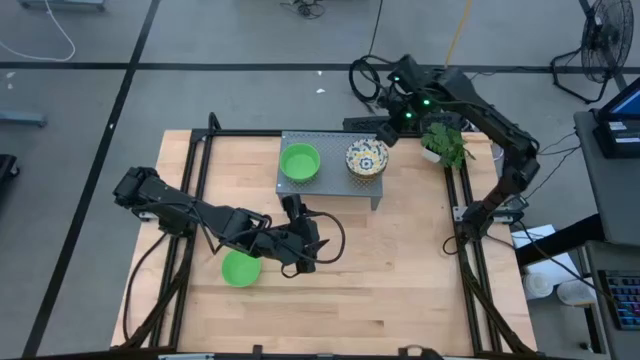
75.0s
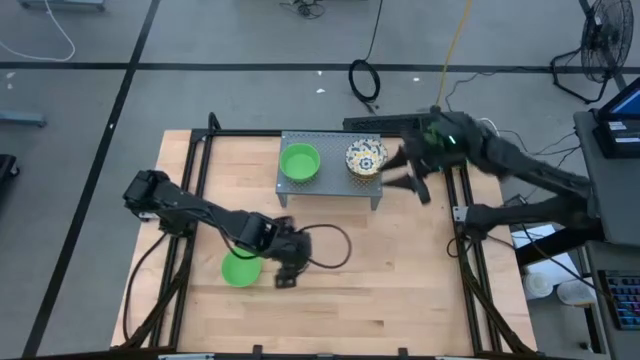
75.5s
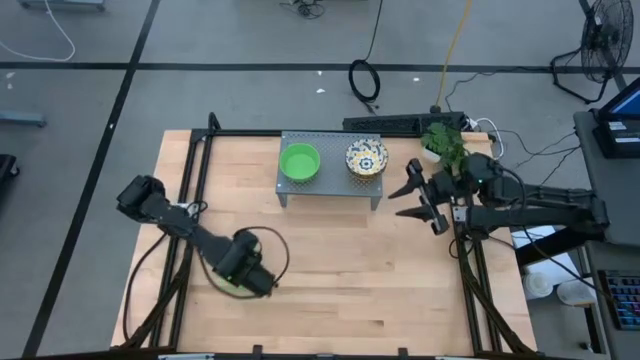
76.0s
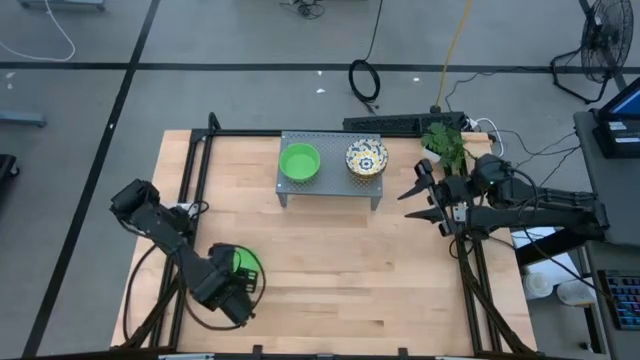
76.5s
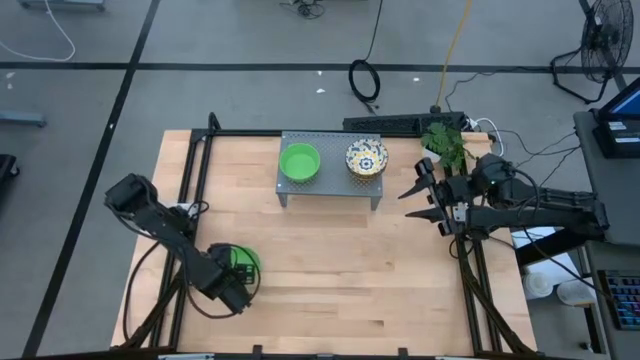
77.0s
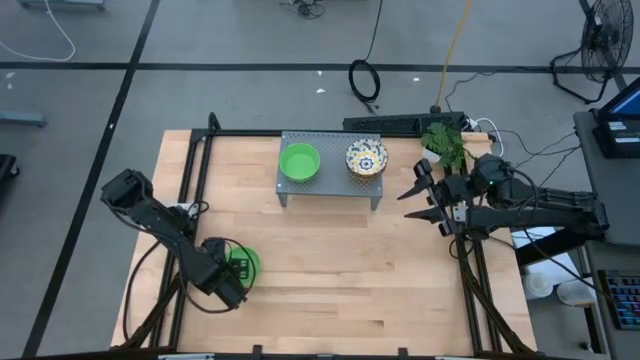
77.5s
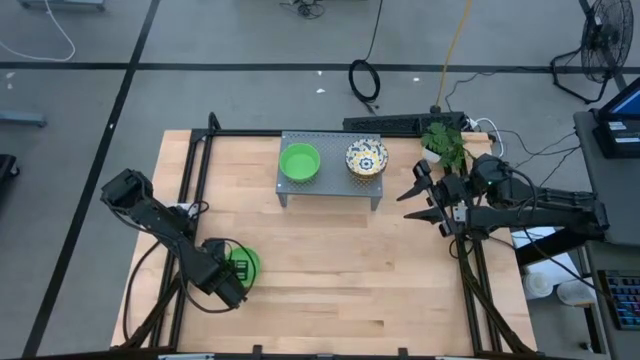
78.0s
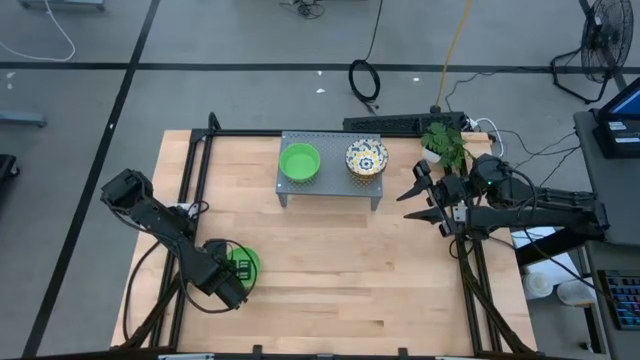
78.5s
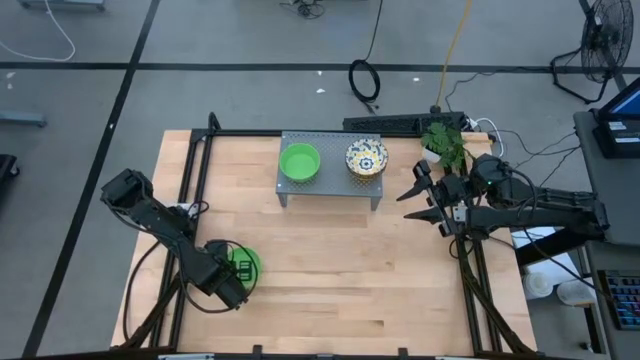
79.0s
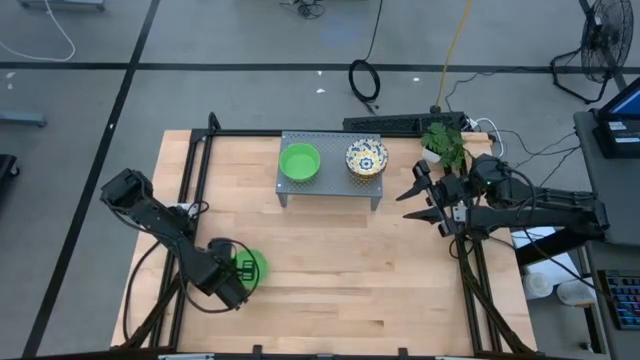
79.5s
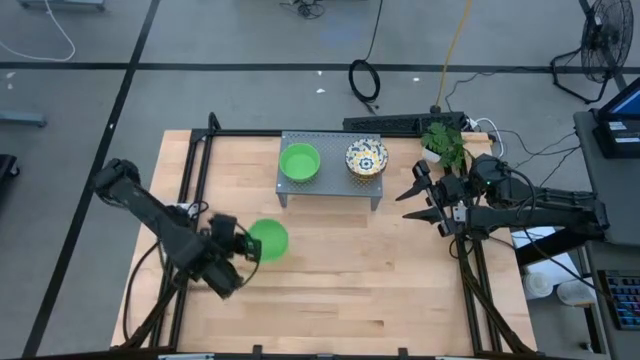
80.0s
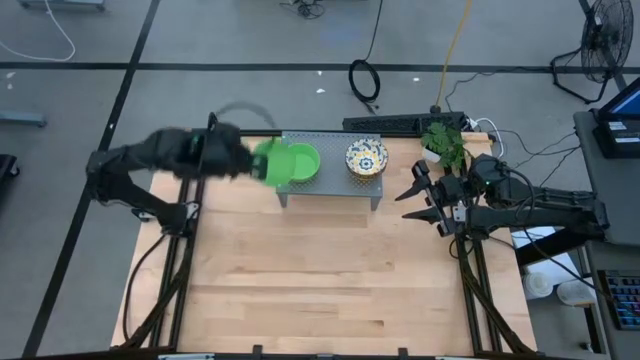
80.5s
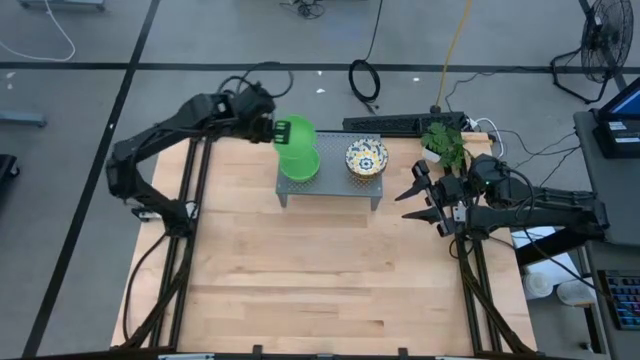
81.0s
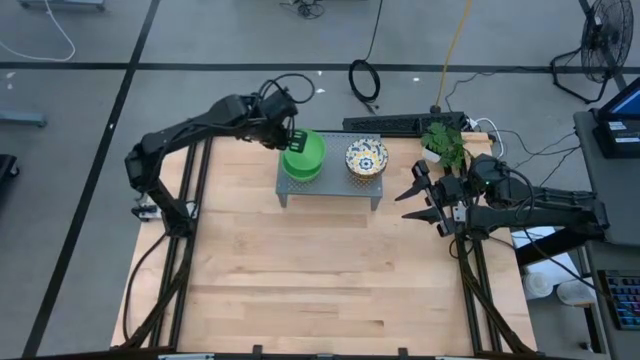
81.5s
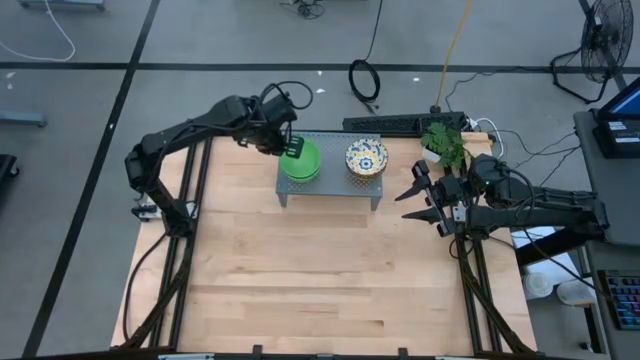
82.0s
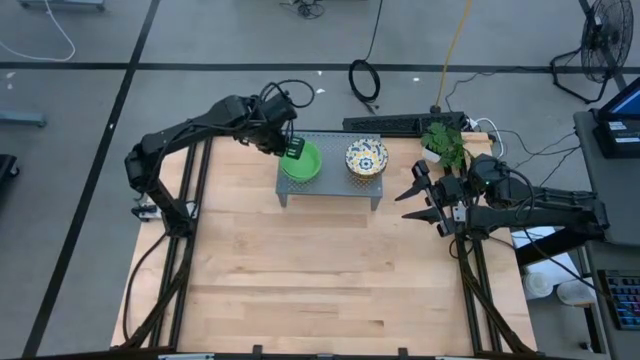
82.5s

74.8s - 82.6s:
Task: Pick & Place Mini bowls
Stack the green bowl on top of the green bowls on the shelf

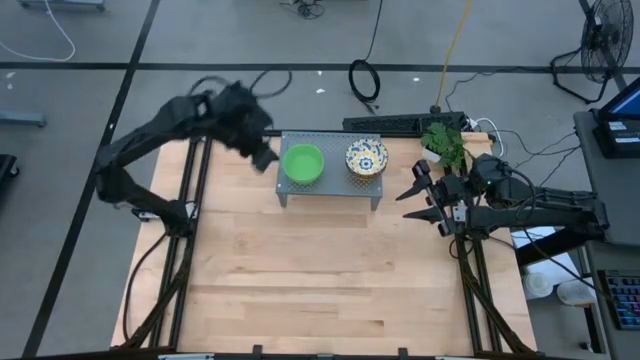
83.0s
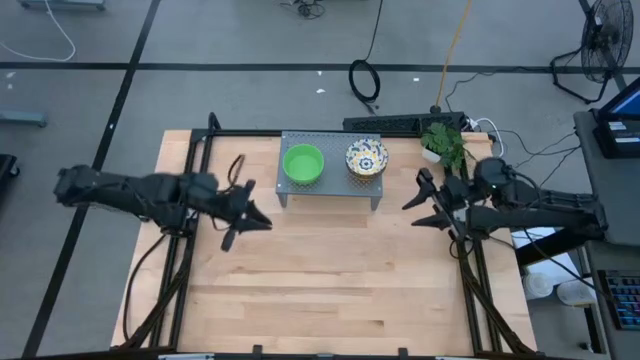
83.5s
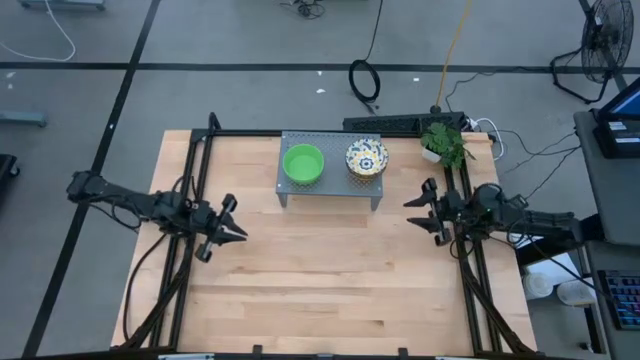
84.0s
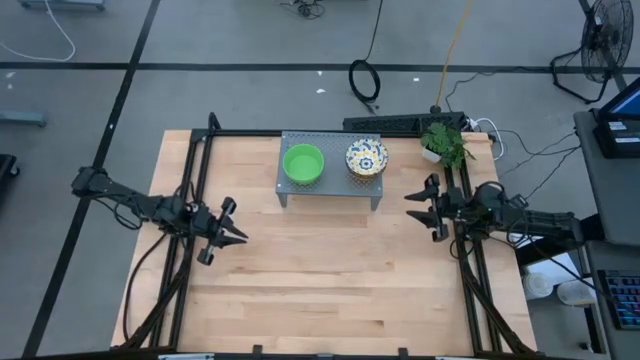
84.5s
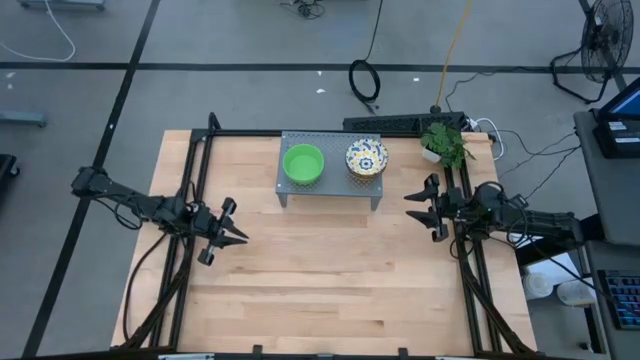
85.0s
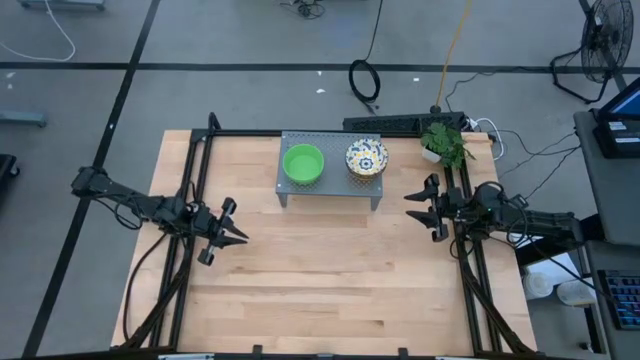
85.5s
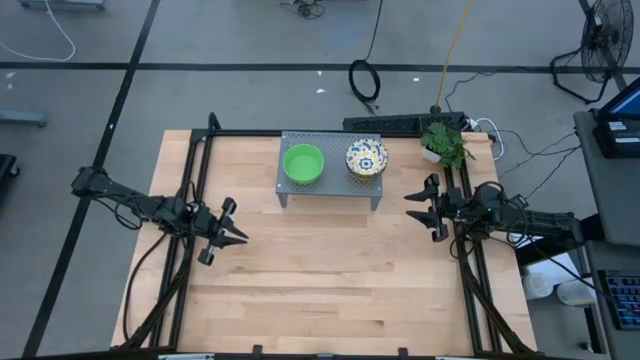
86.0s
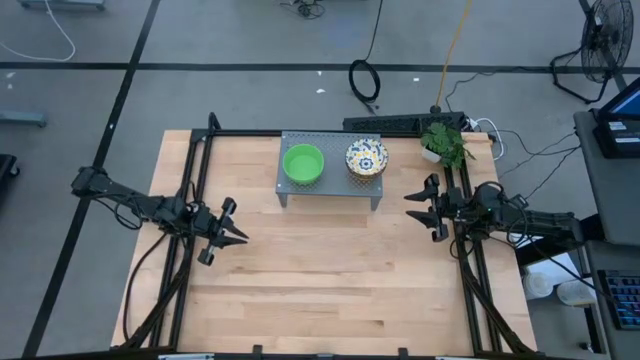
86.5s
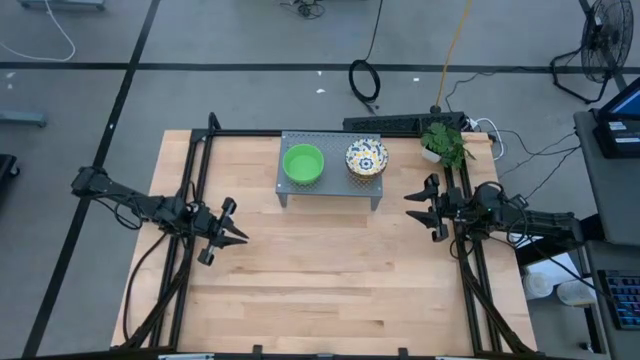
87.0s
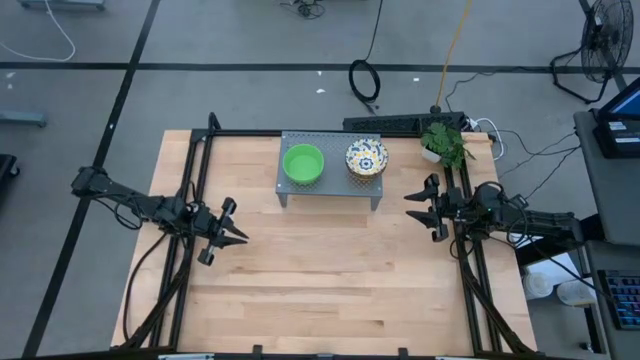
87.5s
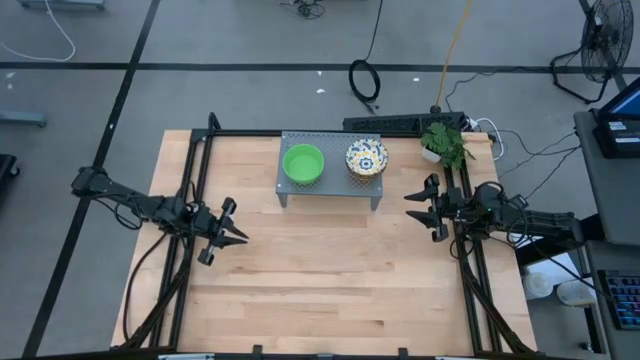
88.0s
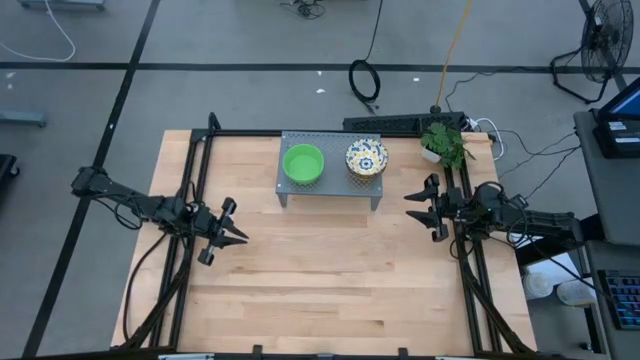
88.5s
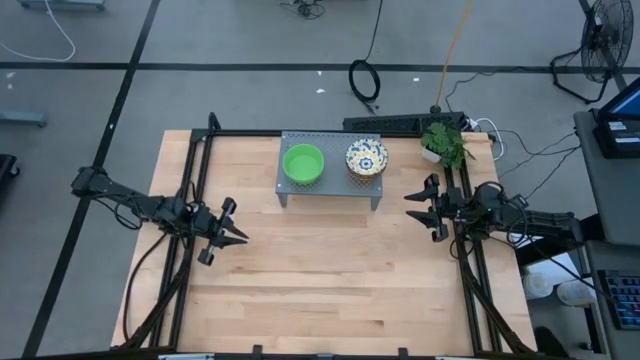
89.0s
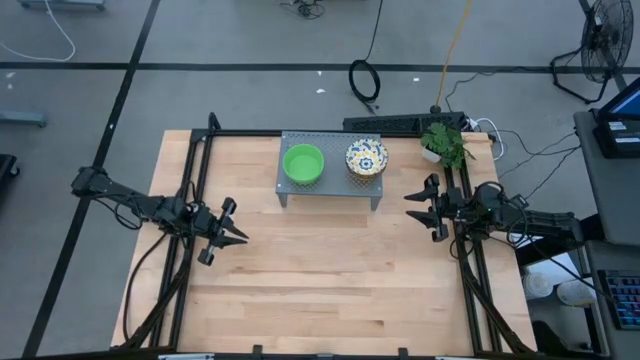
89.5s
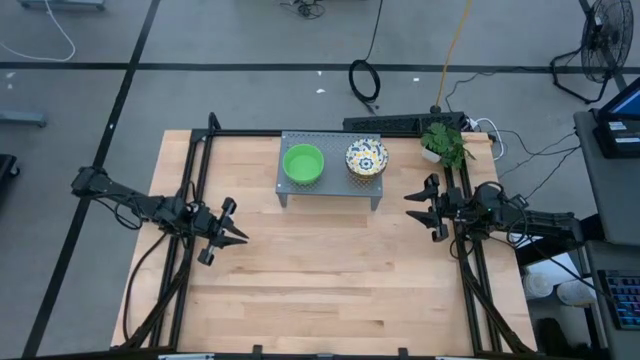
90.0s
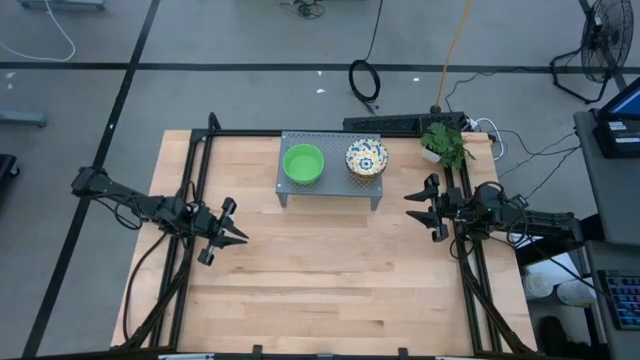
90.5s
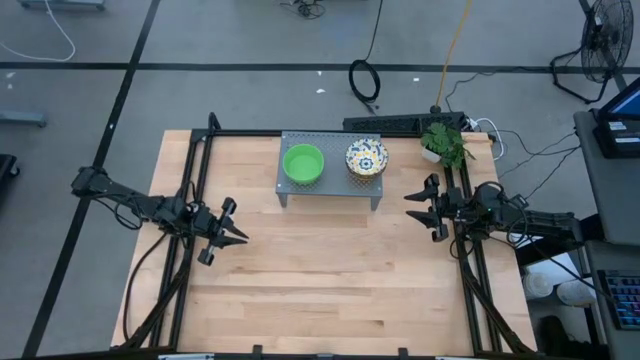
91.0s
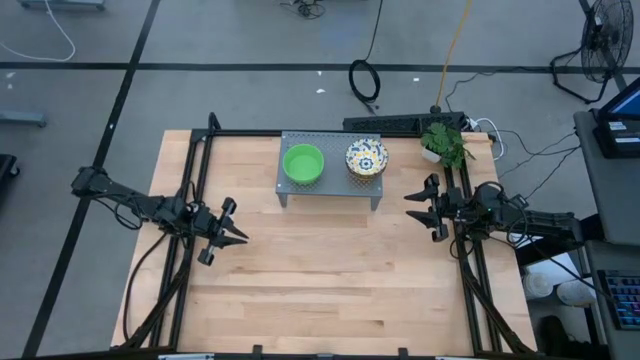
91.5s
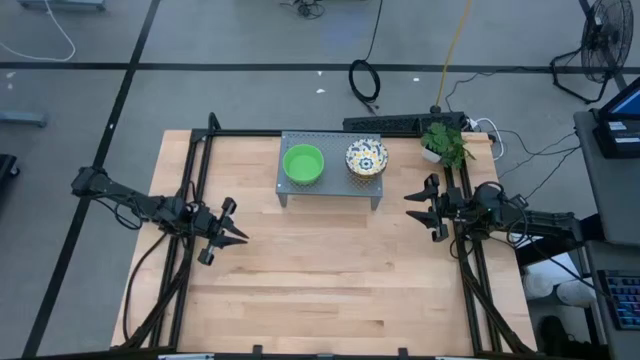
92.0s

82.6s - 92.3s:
Return to Home Position

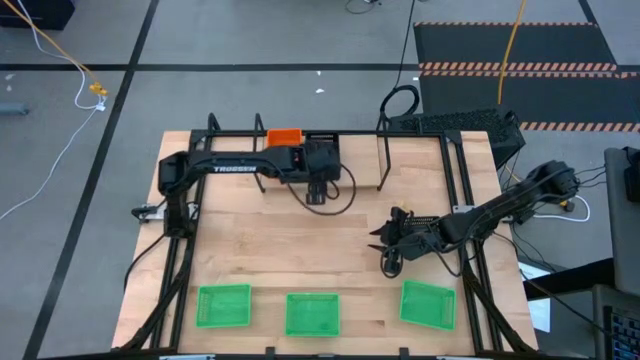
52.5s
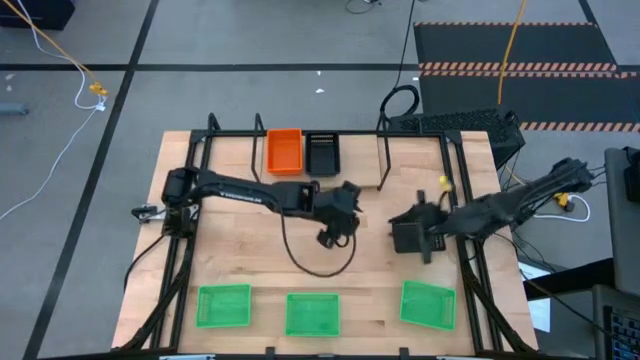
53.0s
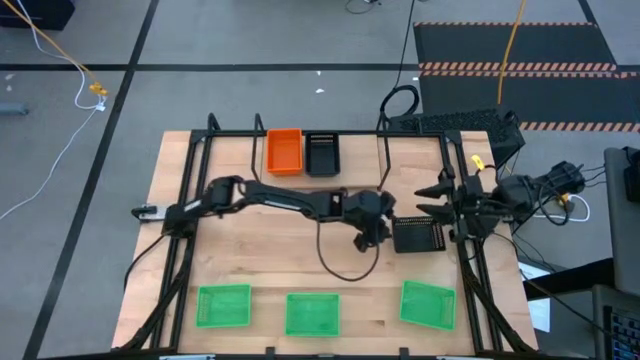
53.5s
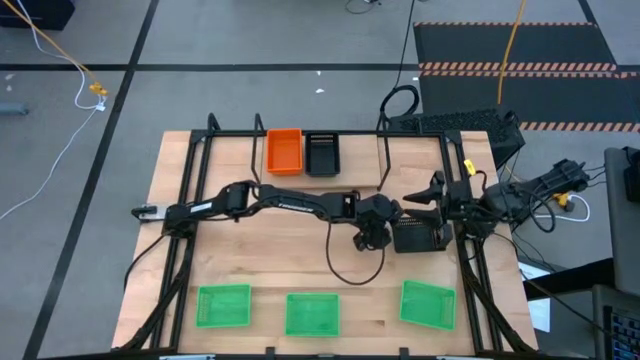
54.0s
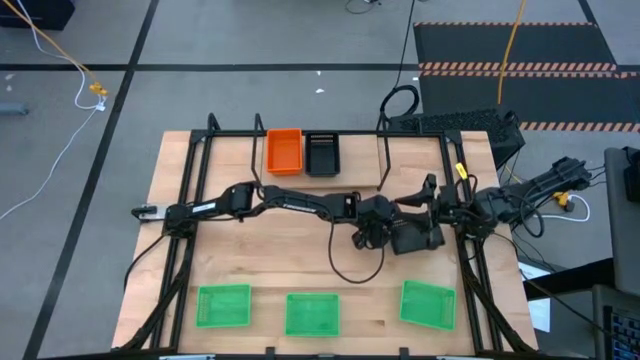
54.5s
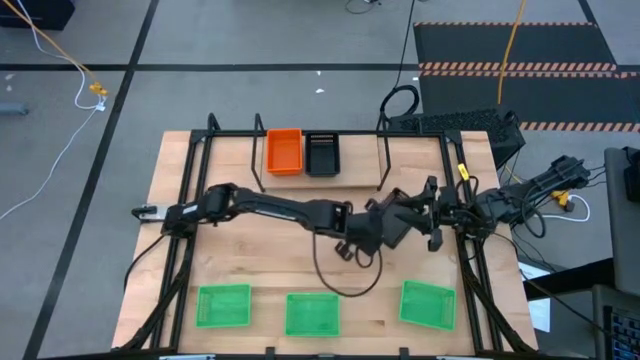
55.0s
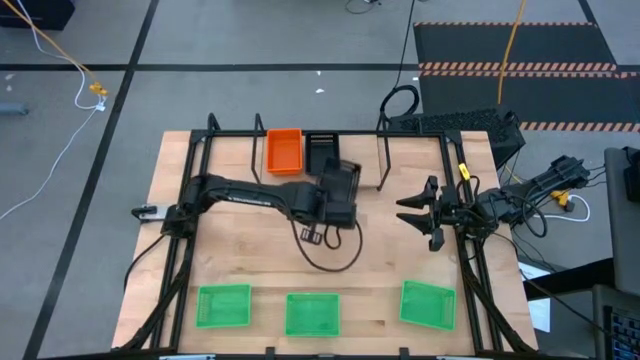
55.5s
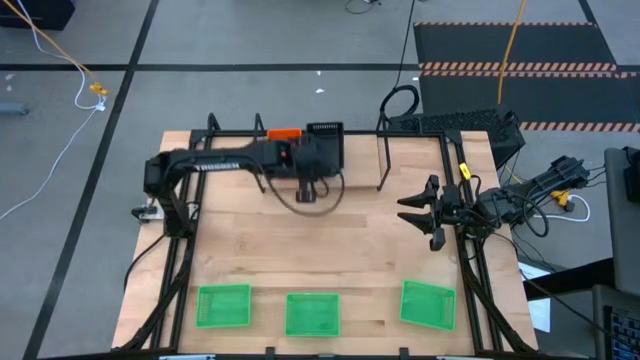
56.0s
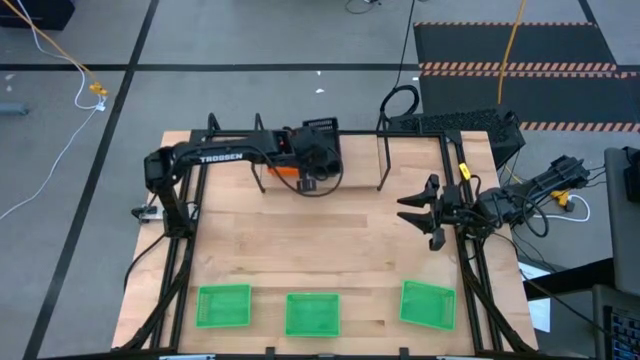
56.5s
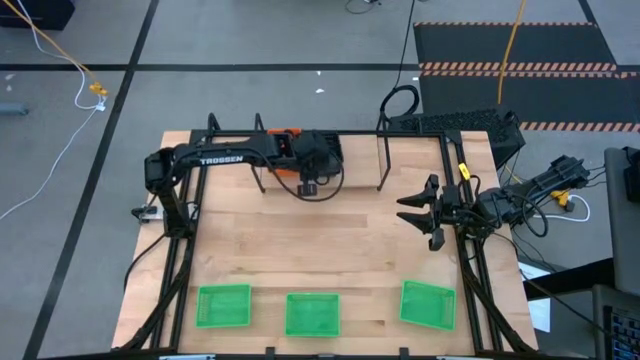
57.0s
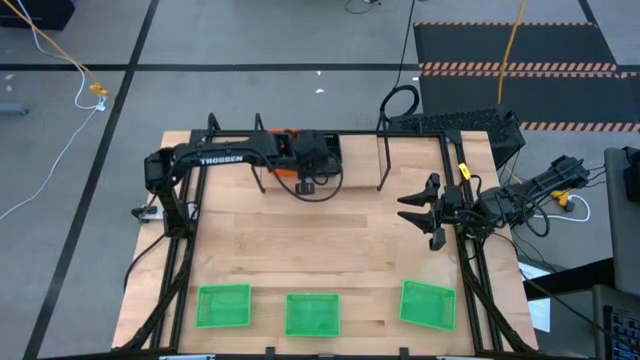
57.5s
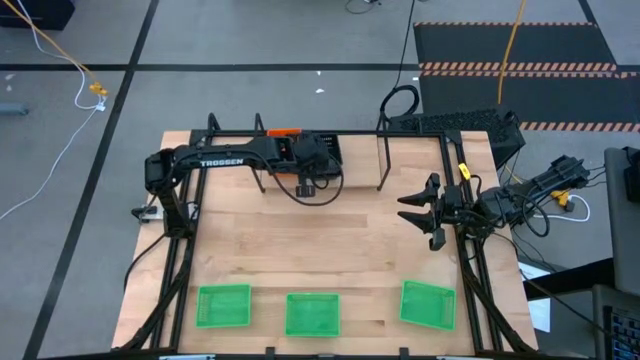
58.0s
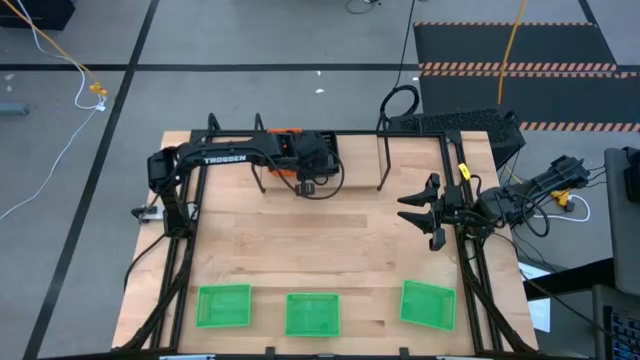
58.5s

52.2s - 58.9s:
Task: Stack baskets on shelf by color
Stack the black basket on top of the black baskets on the shelf
